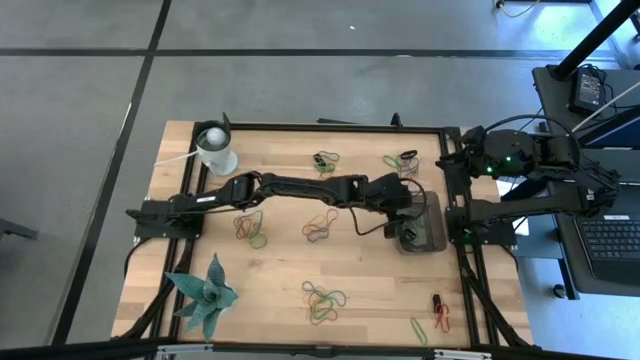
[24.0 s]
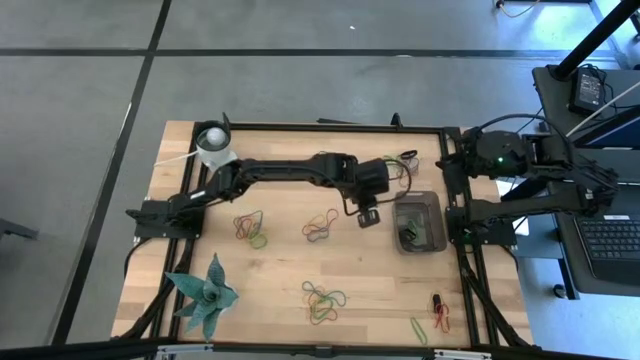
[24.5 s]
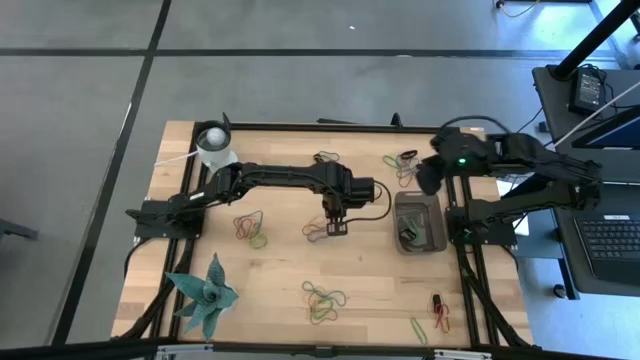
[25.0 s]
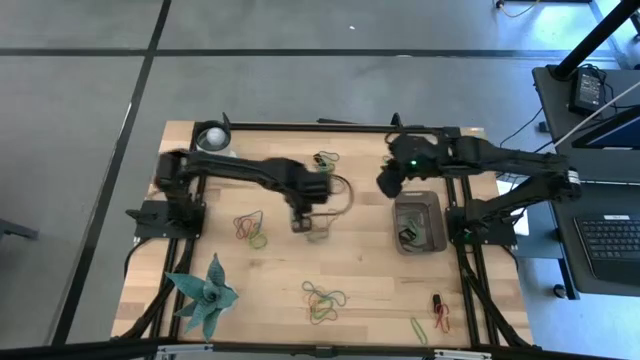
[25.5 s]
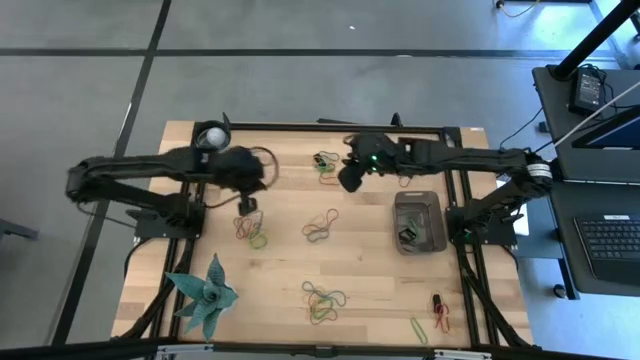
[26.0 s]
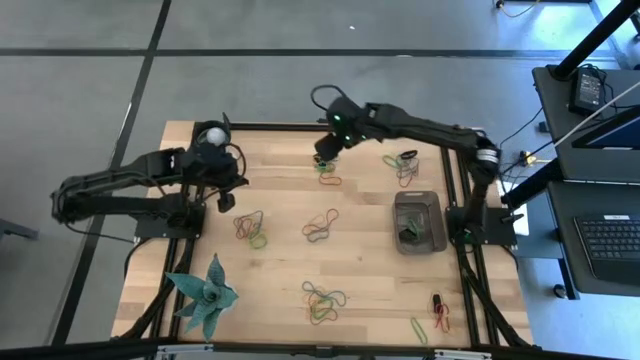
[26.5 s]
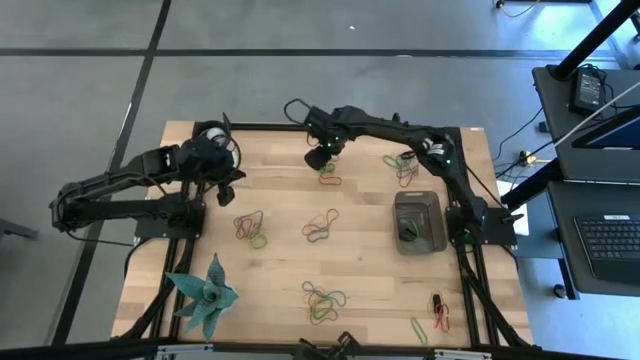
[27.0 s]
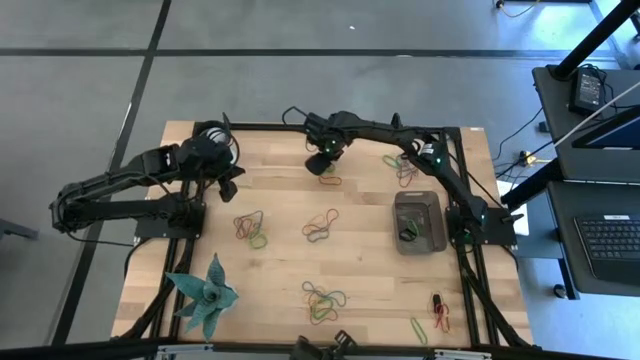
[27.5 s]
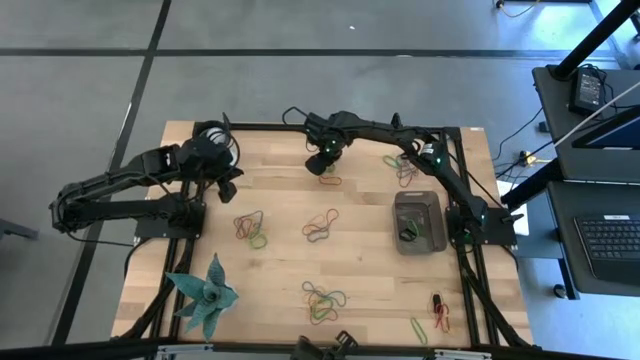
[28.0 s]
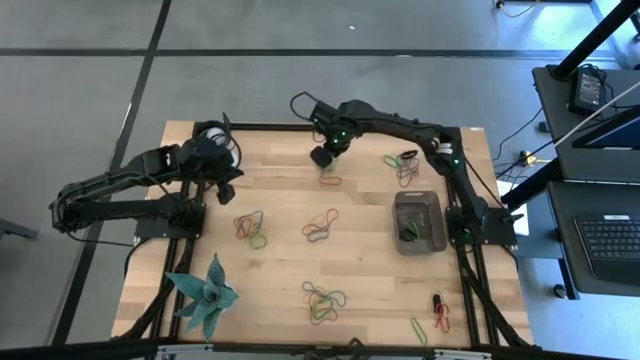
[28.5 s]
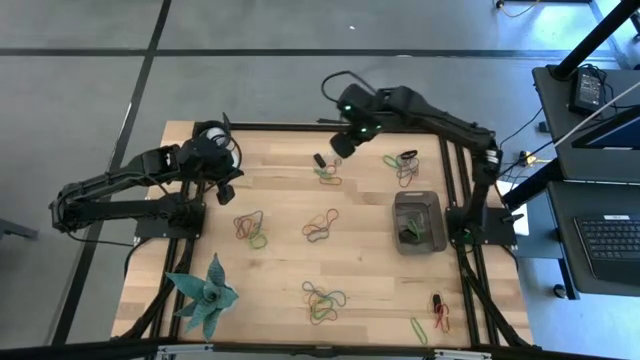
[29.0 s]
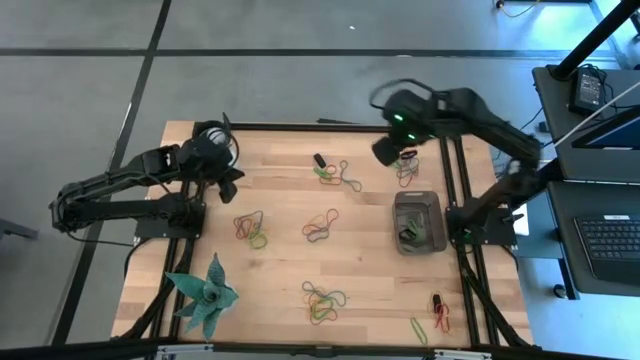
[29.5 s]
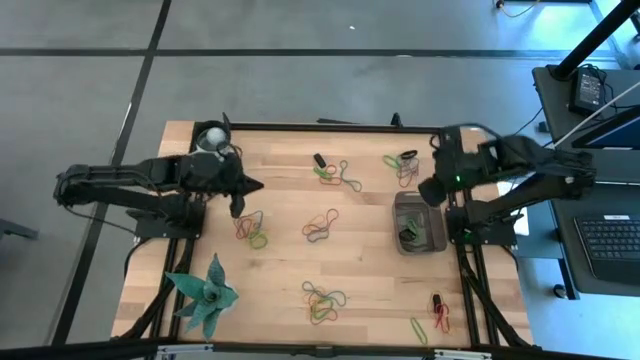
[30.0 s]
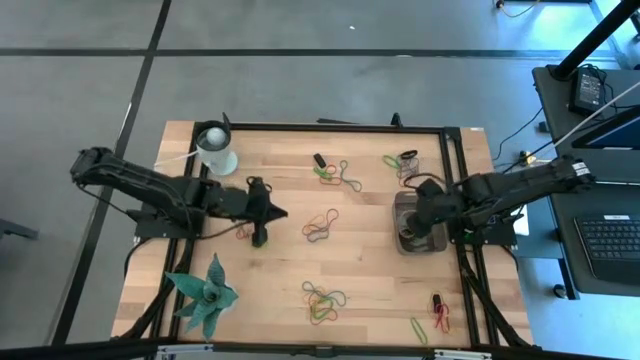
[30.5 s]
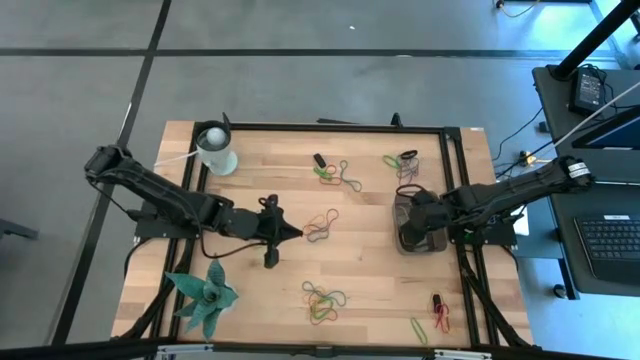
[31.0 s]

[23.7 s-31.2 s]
Task: Pick and place rubber bands into bin
Put the yellow rubber band into the black bin

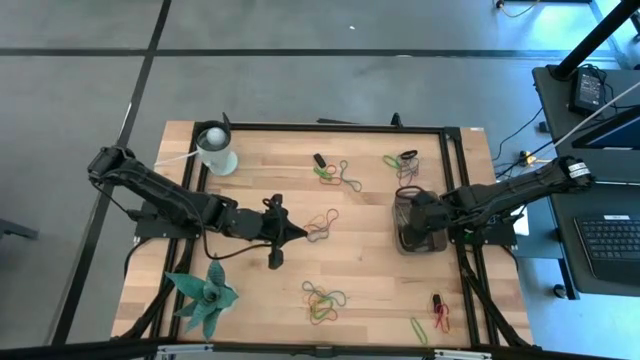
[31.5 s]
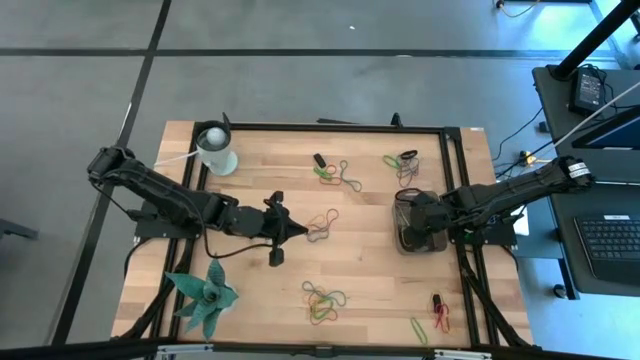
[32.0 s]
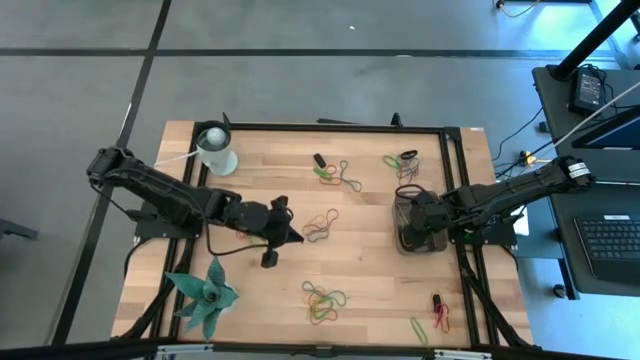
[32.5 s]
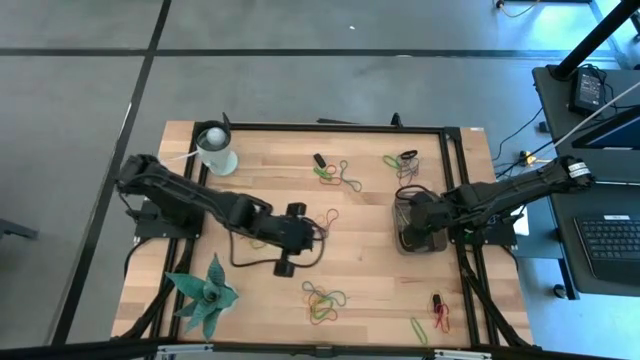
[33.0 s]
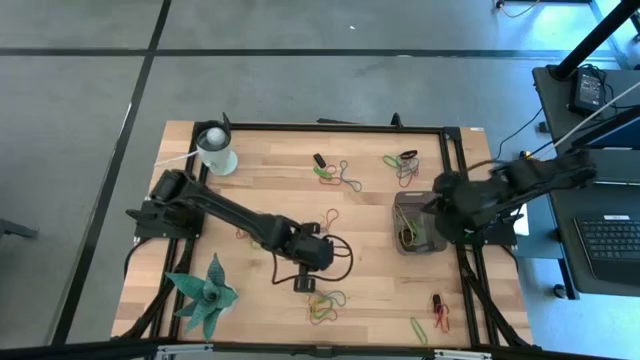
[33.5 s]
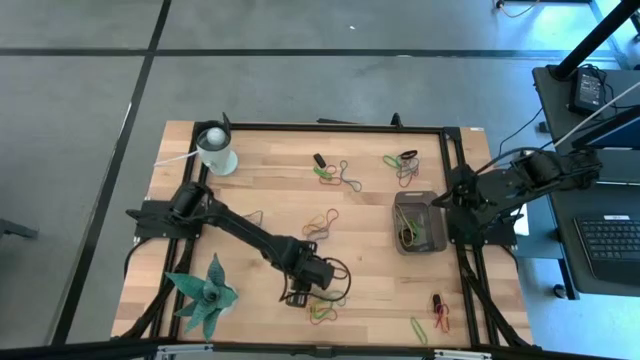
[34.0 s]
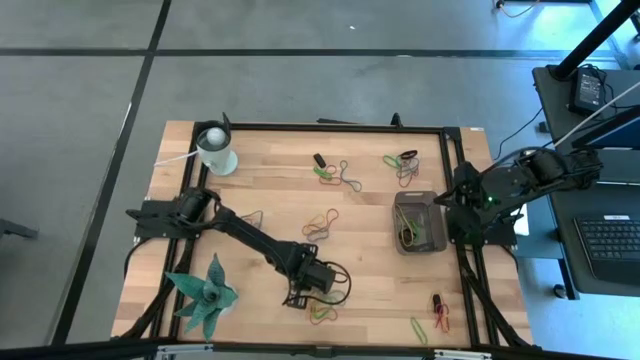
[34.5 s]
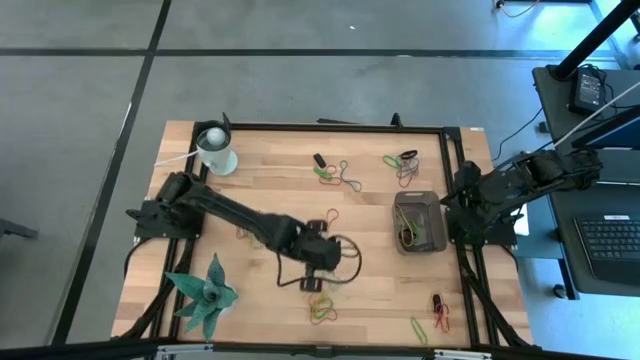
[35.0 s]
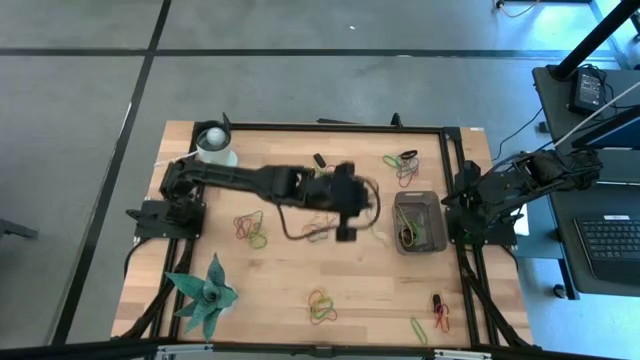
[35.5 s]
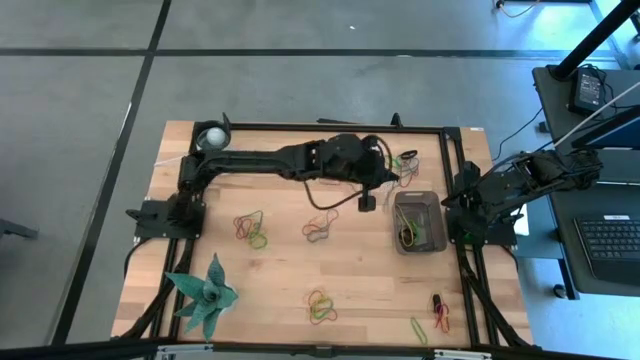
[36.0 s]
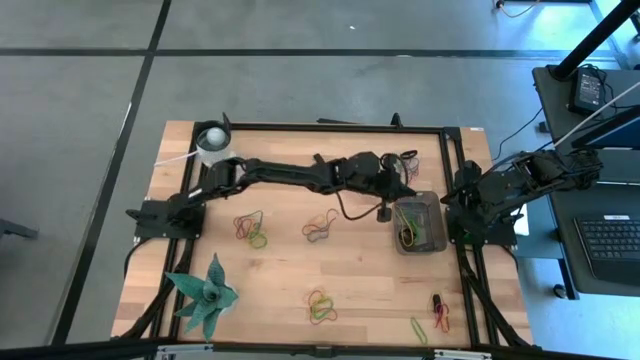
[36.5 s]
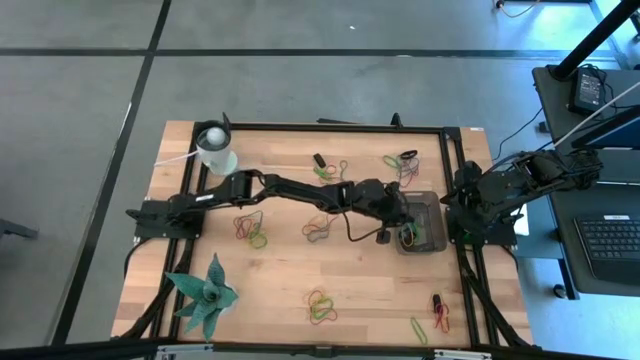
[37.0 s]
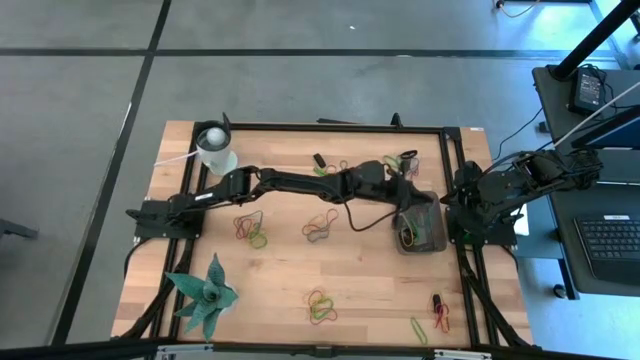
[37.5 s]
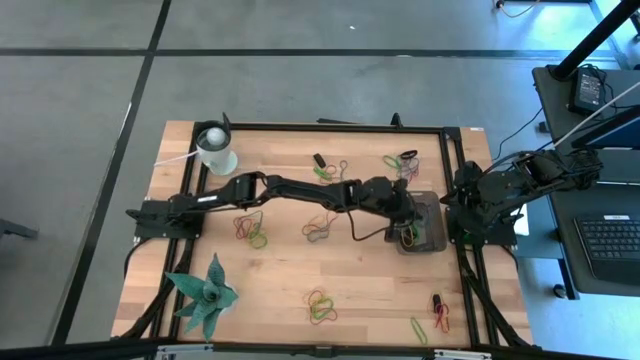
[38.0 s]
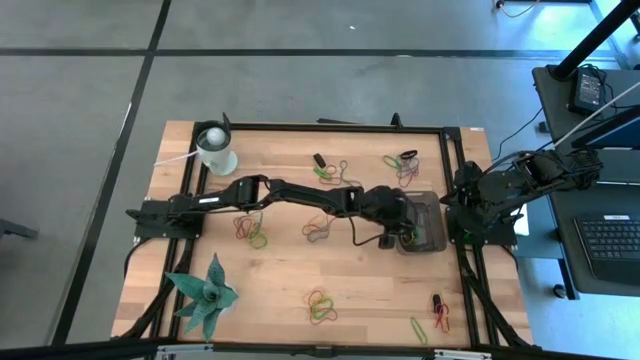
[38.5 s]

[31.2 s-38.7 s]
Put the blue rubber band into the black bin

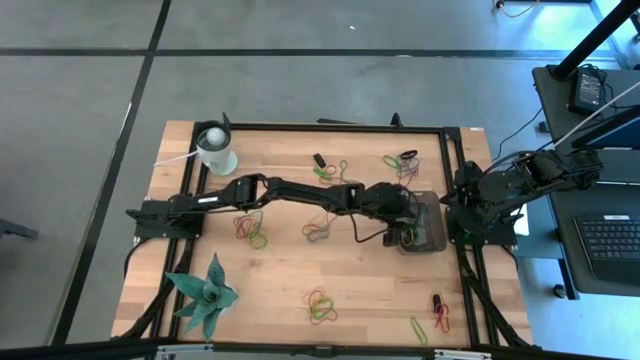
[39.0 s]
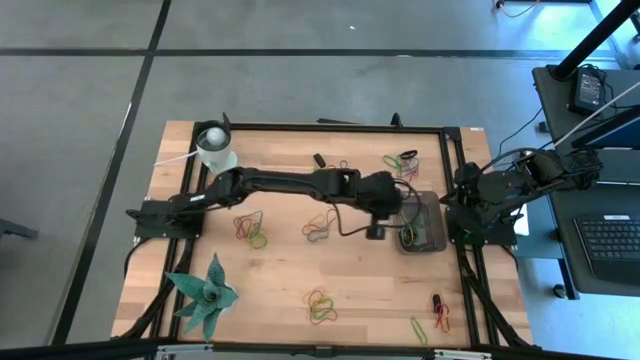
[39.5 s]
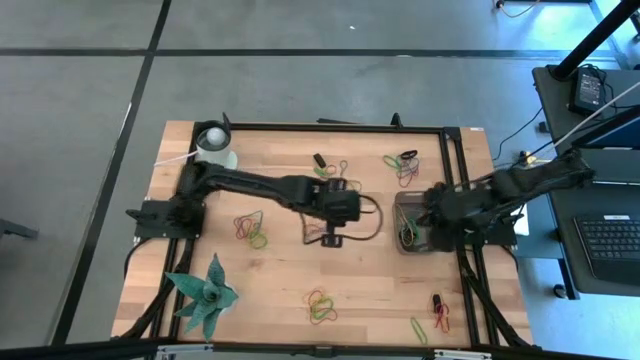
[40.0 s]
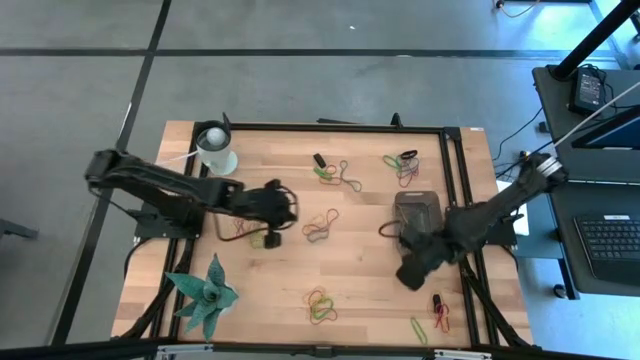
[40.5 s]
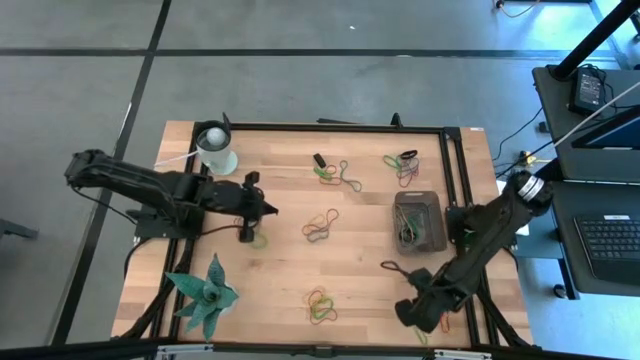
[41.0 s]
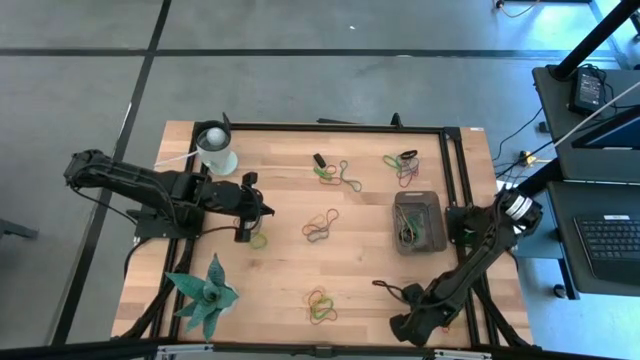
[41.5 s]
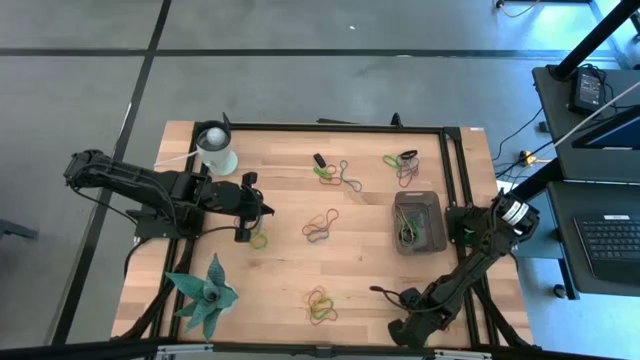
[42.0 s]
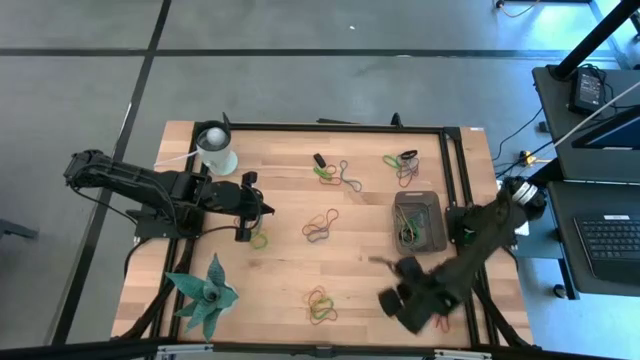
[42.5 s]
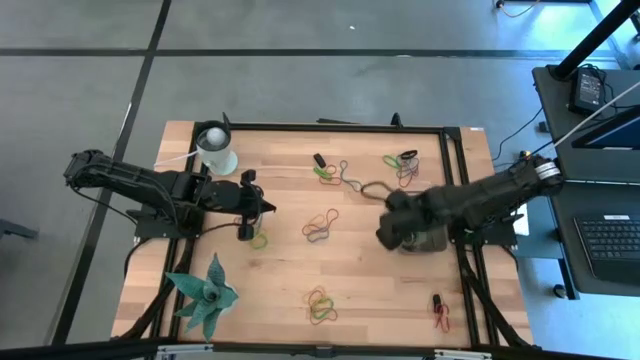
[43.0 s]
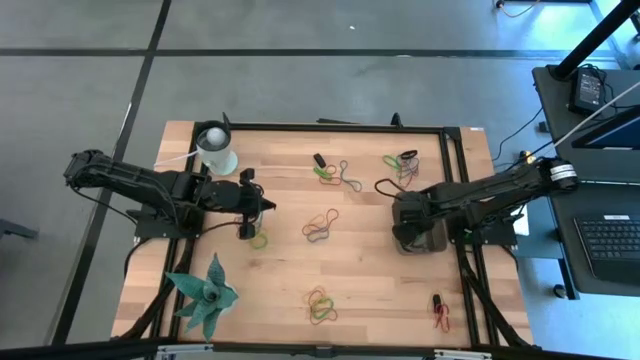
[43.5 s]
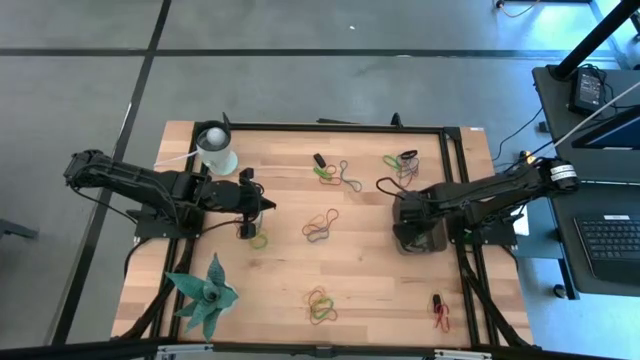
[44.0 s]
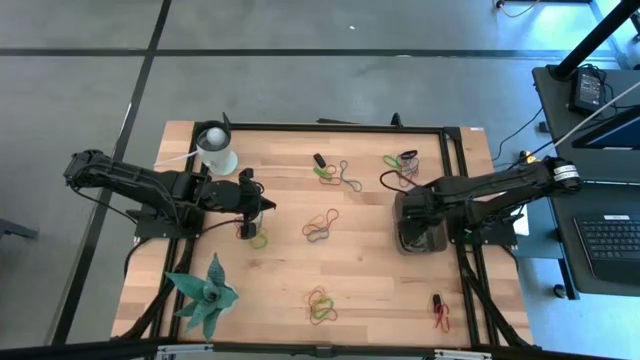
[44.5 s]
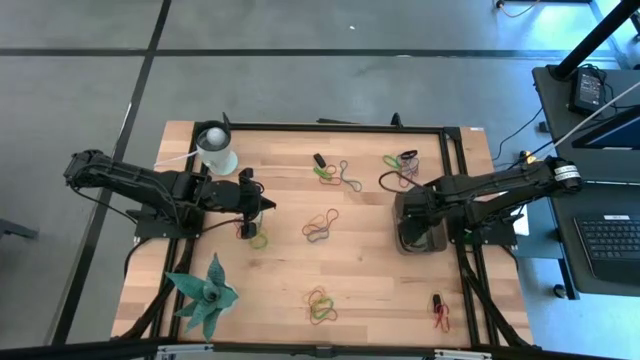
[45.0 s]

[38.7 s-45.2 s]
Put the green rubber band into the black bin
